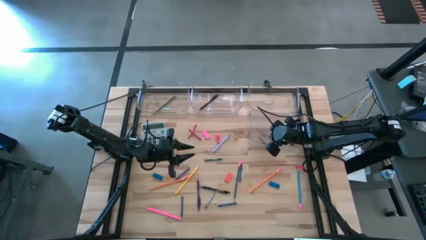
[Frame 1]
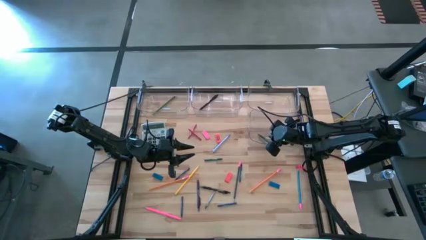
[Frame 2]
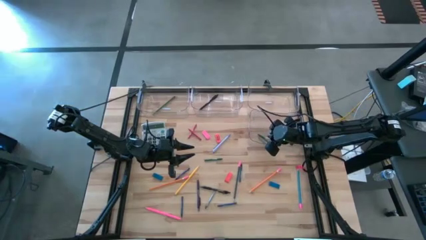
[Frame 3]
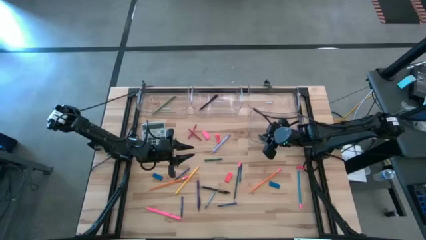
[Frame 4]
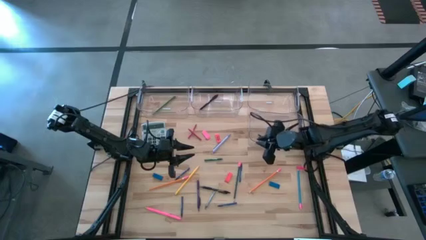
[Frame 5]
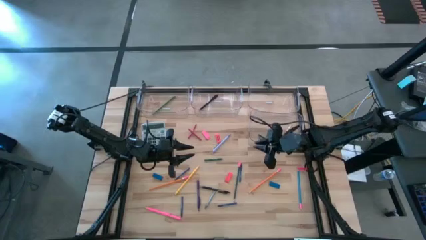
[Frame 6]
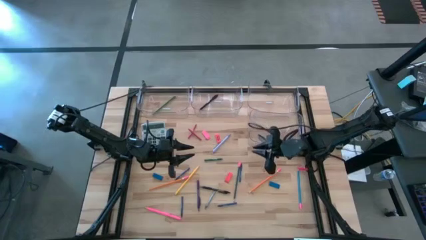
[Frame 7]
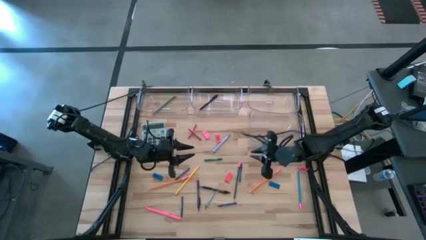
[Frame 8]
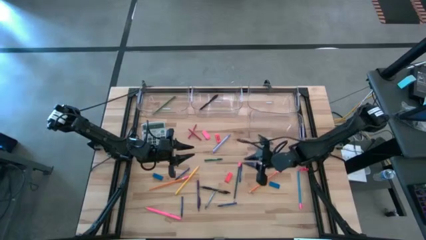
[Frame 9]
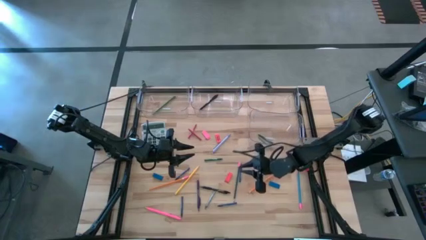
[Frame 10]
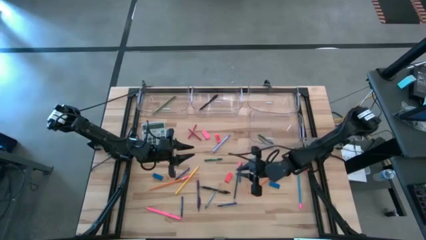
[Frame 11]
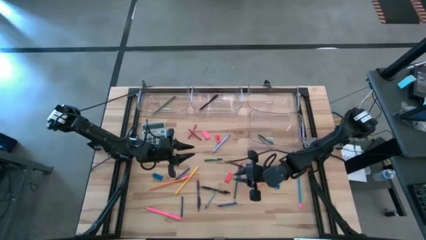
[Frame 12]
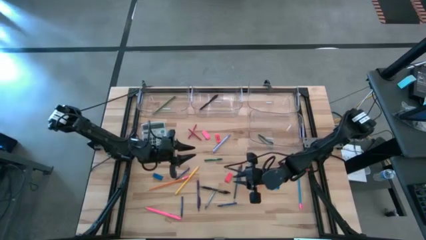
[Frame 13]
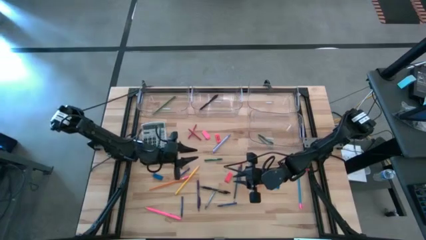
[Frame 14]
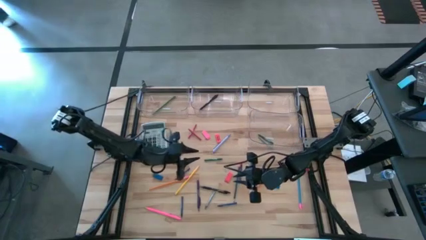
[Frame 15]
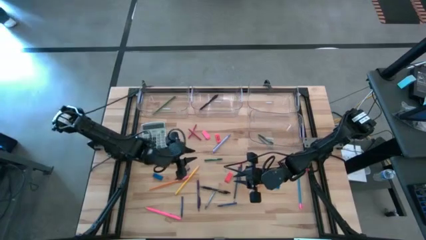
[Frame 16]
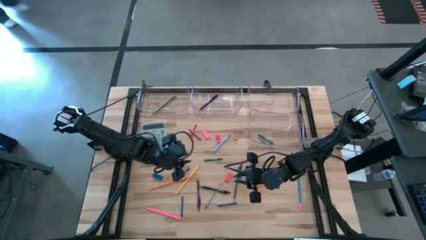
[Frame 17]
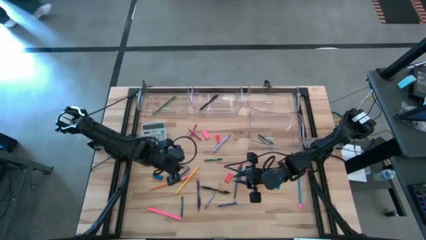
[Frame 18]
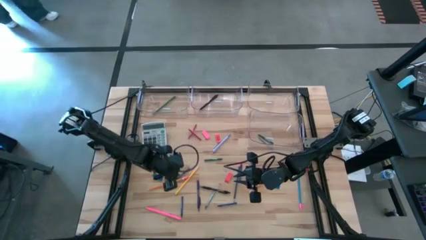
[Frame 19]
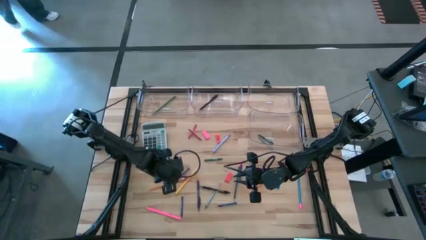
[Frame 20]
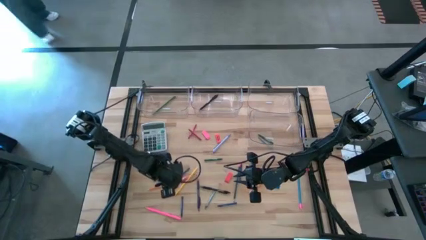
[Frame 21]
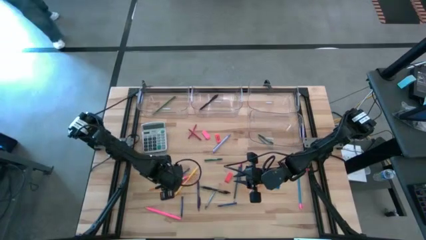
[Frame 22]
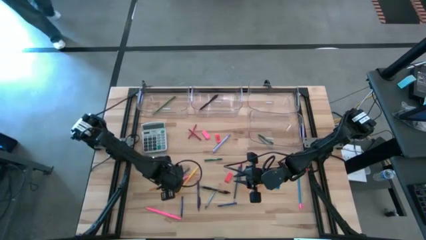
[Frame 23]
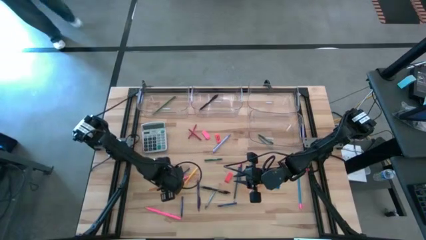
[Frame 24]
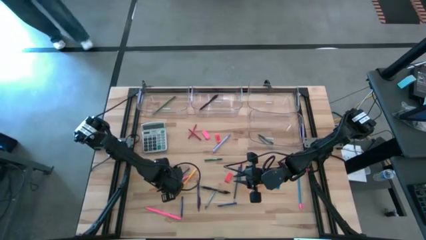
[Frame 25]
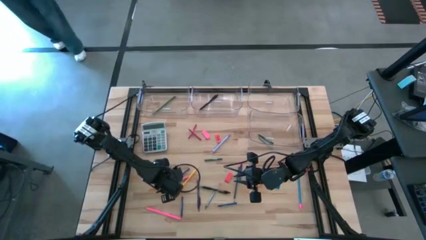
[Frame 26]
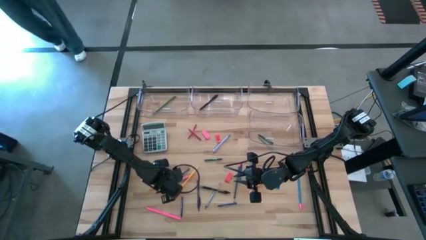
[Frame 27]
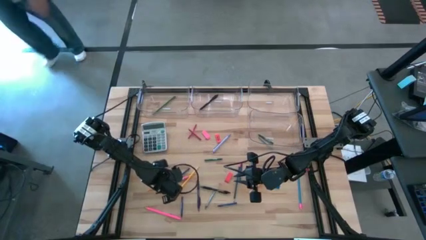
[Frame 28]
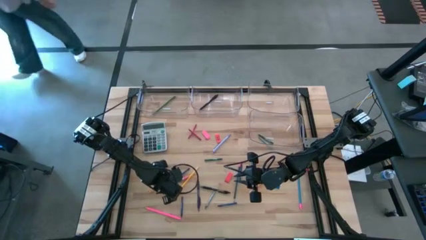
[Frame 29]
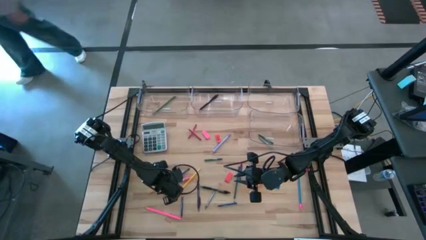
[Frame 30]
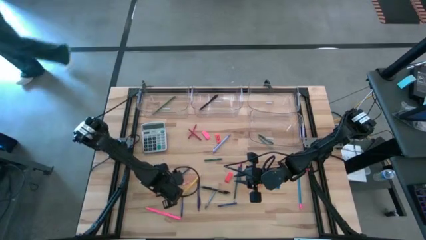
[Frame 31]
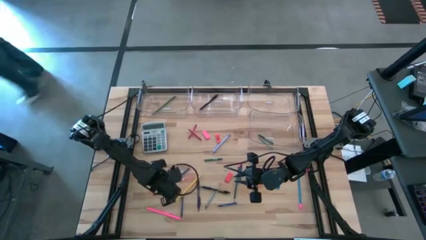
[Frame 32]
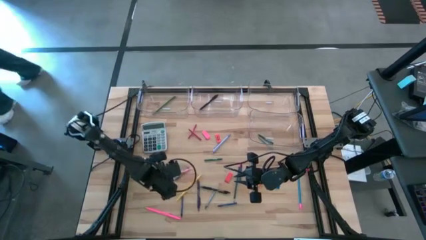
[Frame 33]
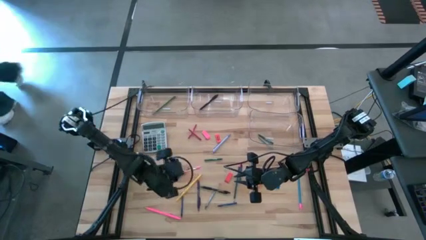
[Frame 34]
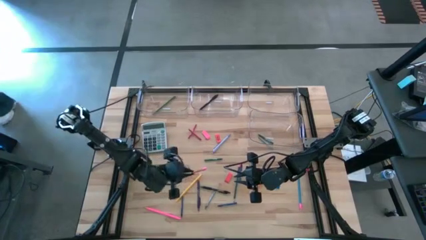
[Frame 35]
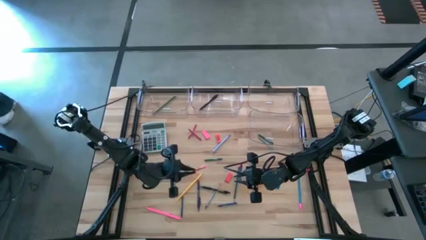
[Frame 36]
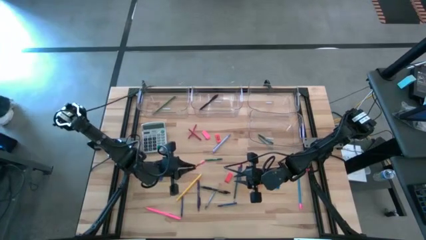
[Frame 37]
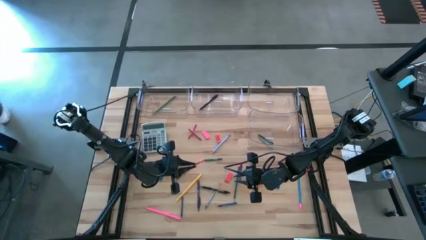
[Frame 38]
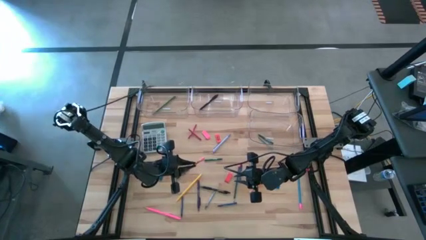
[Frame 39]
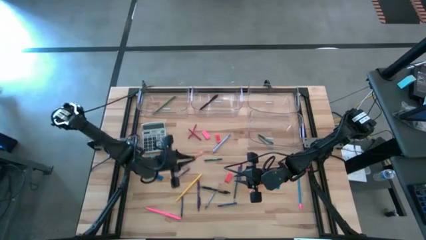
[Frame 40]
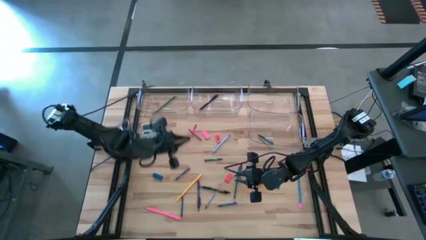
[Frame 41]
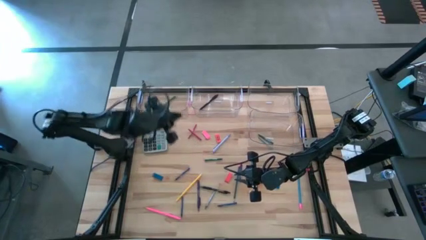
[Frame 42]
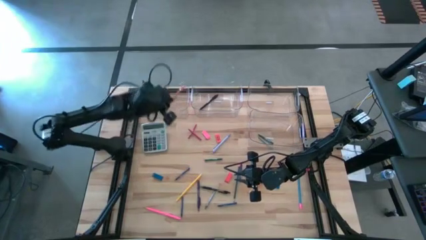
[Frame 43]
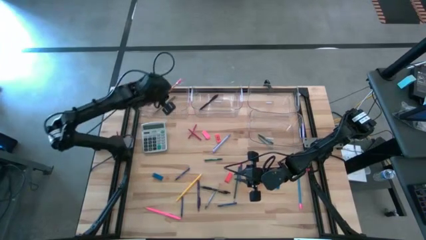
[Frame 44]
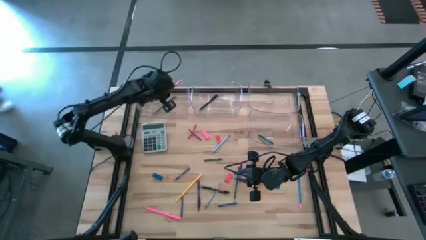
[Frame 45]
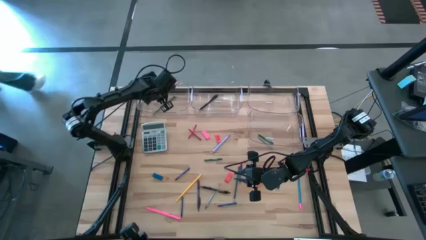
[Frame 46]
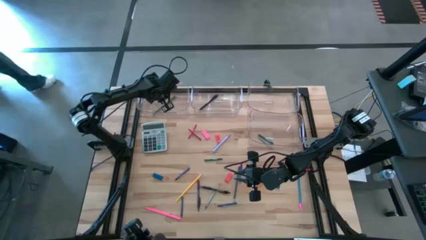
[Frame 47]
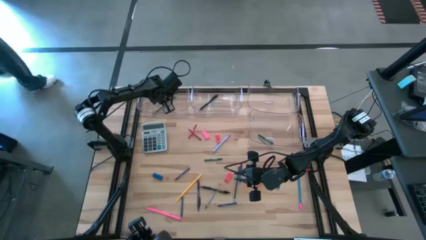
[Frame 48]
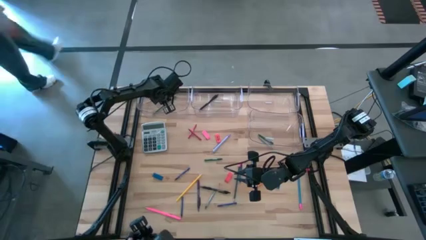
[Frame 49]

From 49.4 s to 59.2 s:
Task: Sort crayons/erasers/pens/pencils in bins
Put the orange pencil into the top right transparent bin

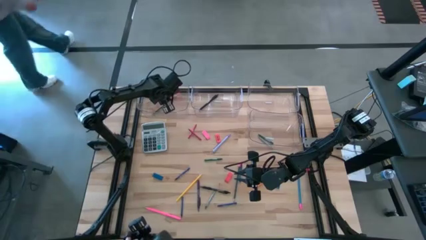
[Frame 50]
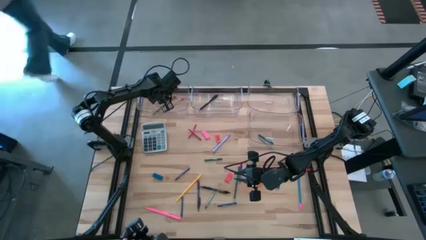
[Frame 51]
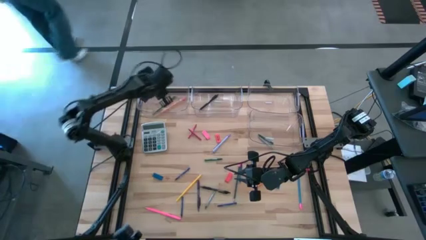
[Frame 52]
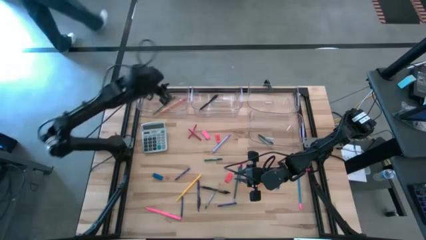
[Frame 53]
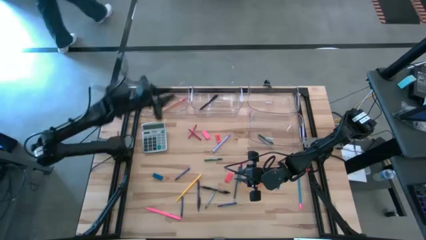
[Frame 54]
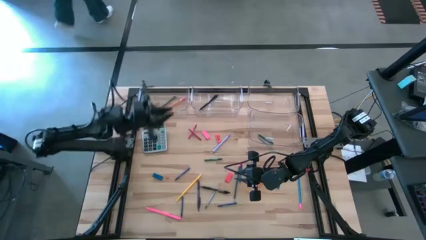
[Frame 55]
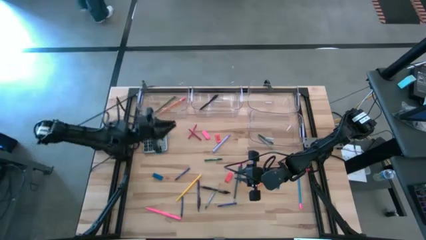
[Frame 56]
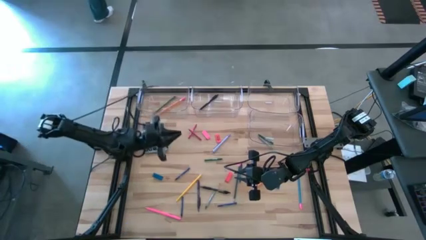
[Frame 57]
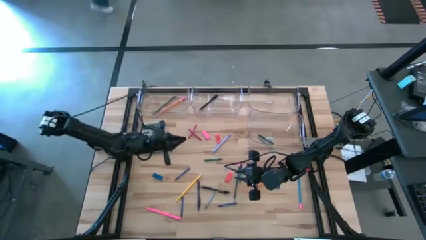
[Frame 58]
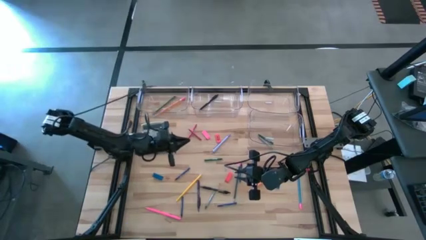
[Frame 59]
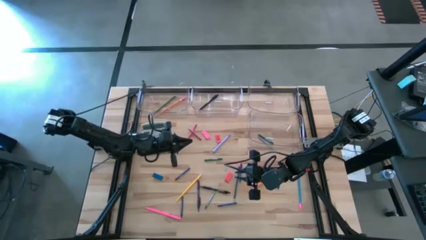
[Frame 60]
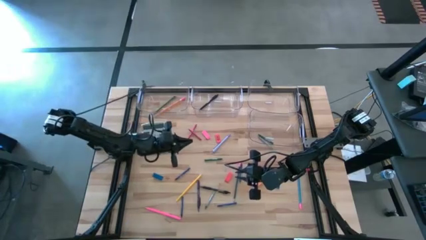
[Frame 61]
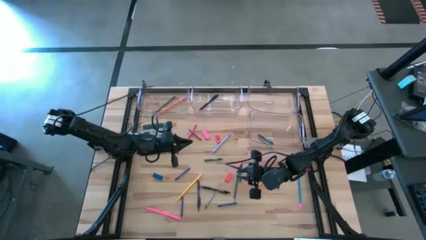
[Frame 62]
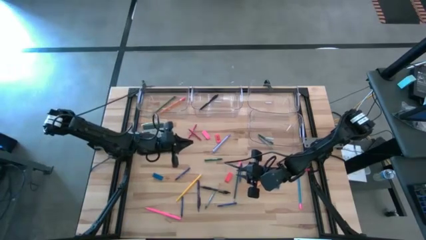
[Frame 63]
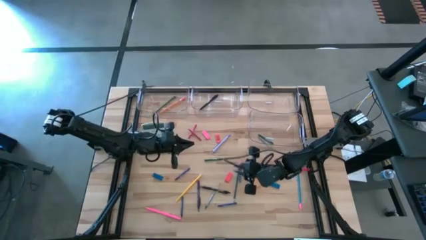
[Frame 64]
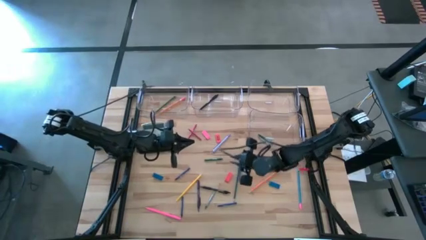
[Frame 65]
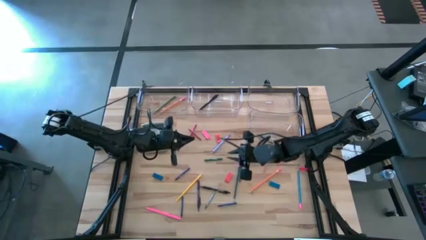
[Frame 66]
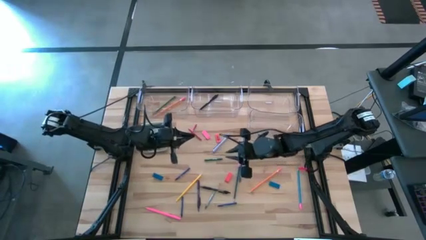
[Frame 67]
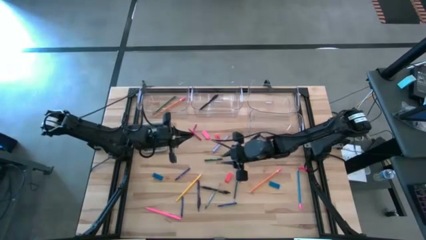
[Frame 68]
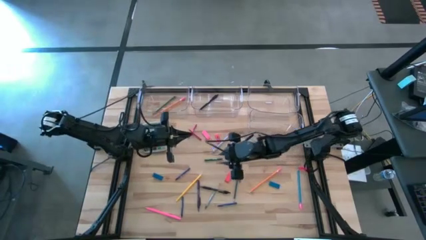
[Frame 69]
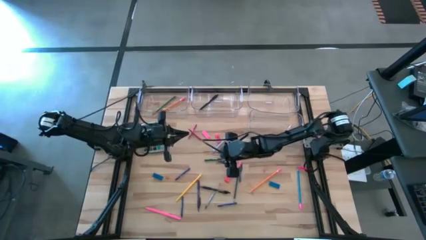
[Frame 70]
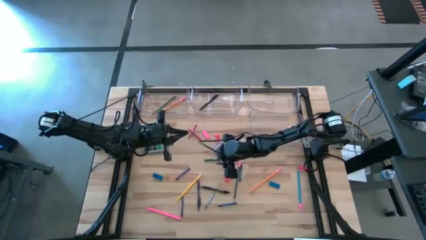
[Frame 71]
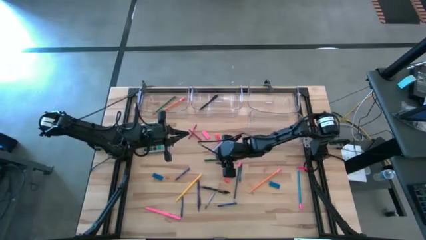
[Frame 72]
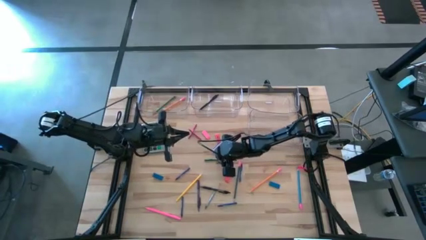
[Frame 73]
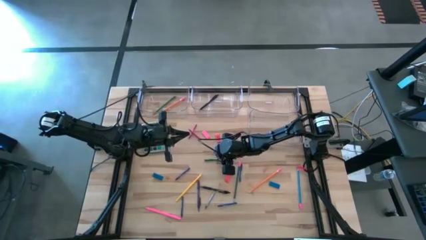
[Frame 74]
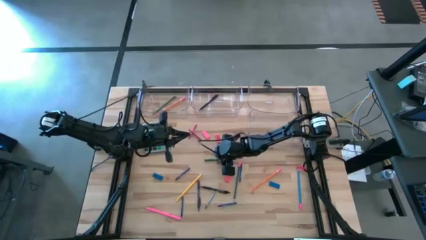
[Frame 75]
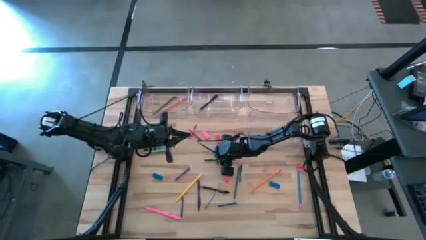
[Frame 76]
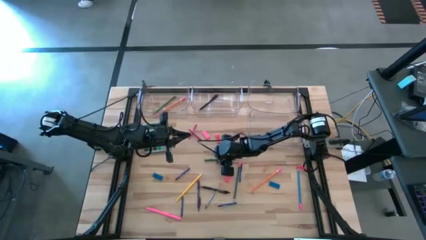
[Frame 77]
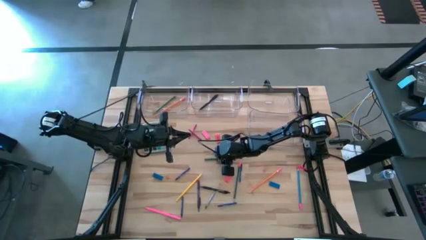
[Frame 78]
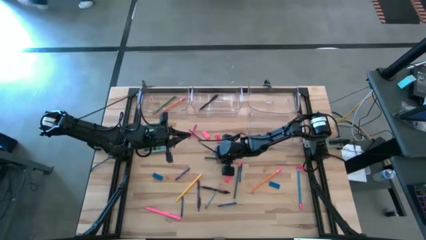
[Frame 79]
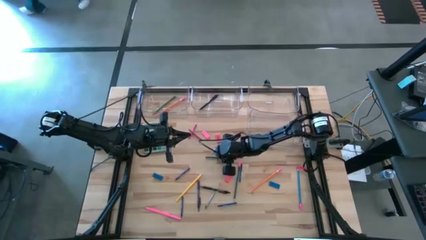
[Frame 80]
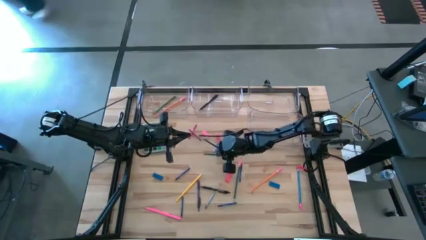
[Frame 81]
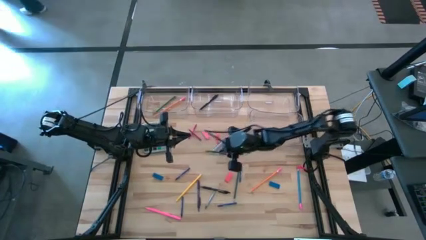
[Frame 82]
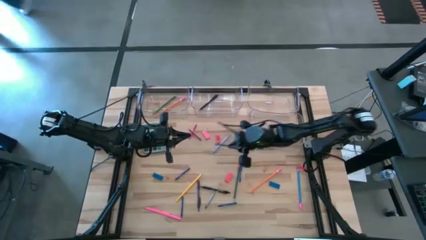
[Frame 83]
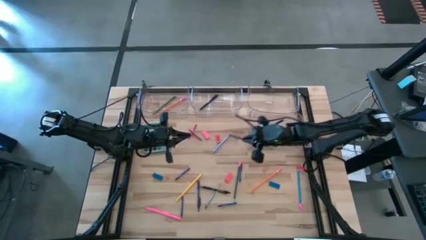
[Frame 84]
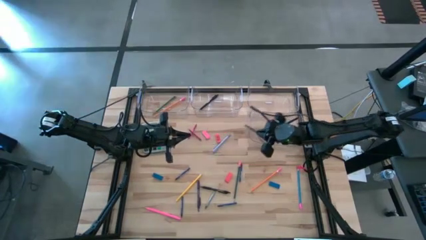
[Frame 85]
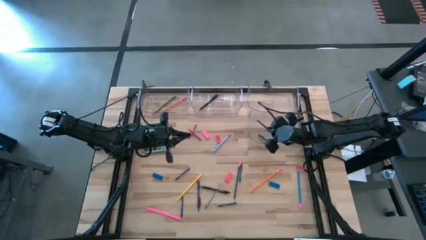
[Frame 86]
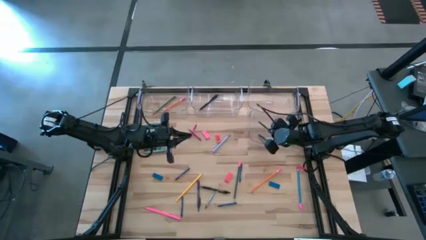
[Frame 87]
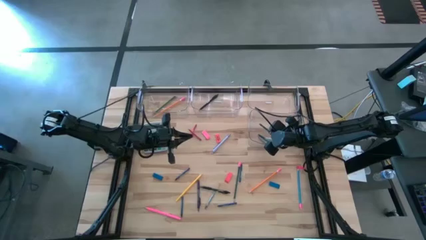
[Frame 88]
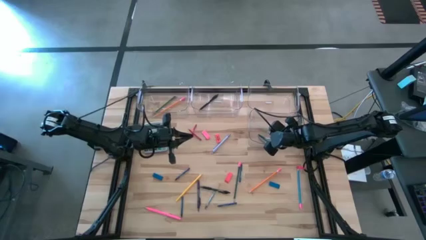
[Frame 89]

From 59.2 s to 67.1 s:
Put the green crayon into the bottom transparent bin
